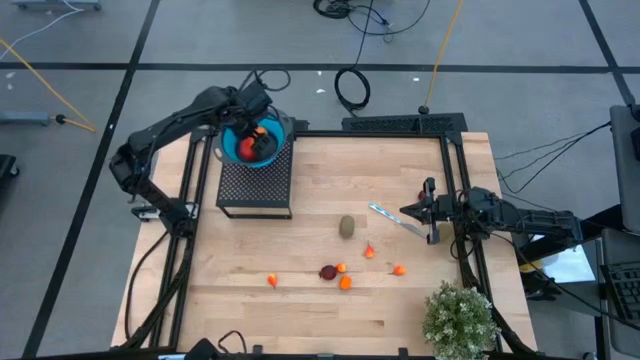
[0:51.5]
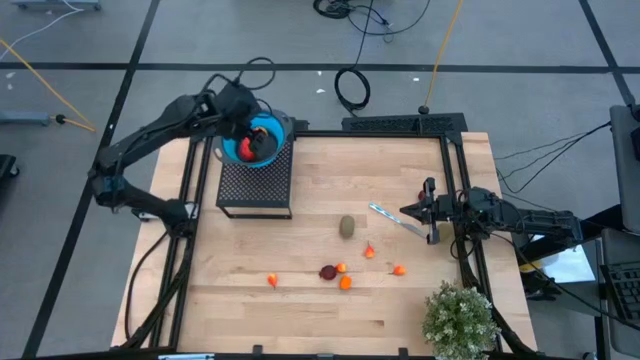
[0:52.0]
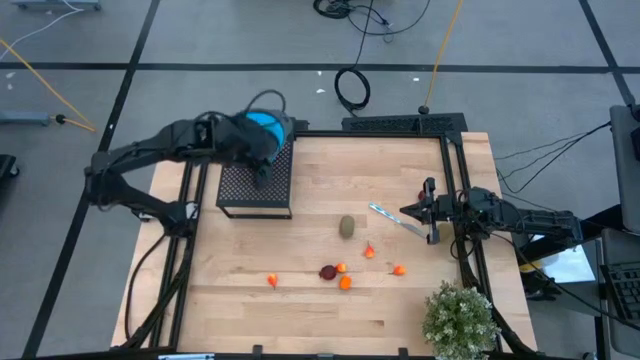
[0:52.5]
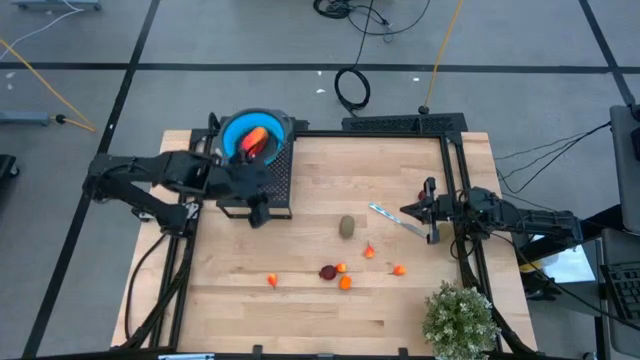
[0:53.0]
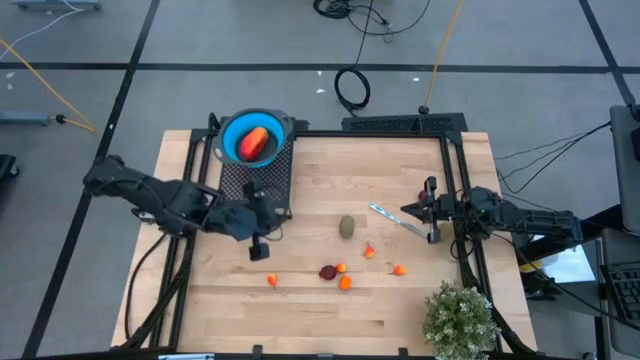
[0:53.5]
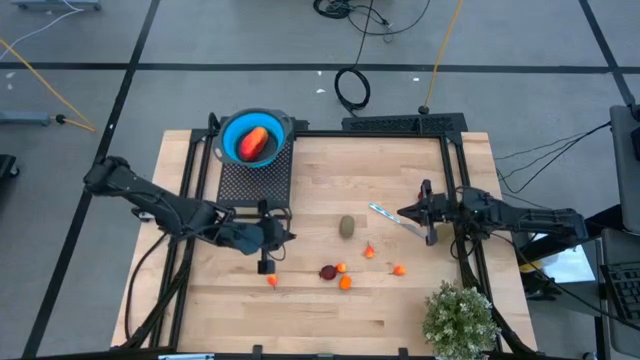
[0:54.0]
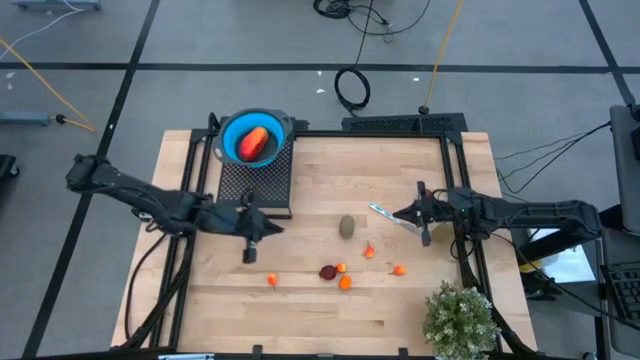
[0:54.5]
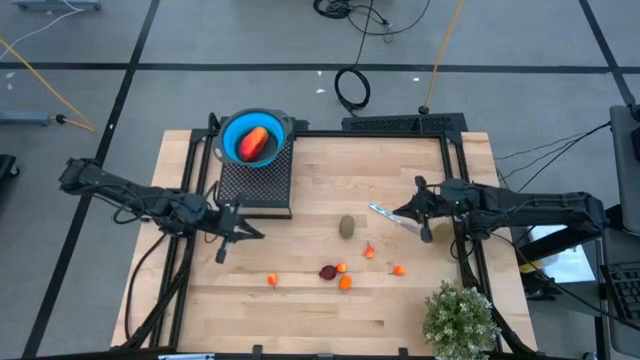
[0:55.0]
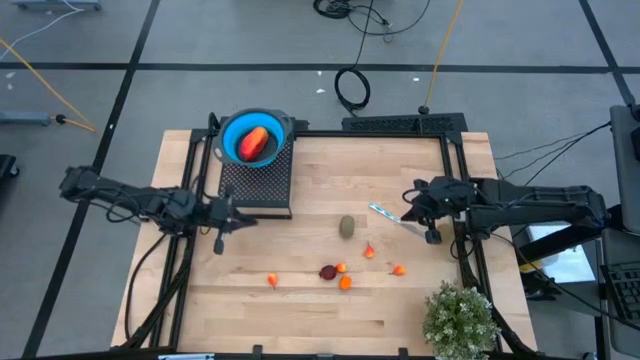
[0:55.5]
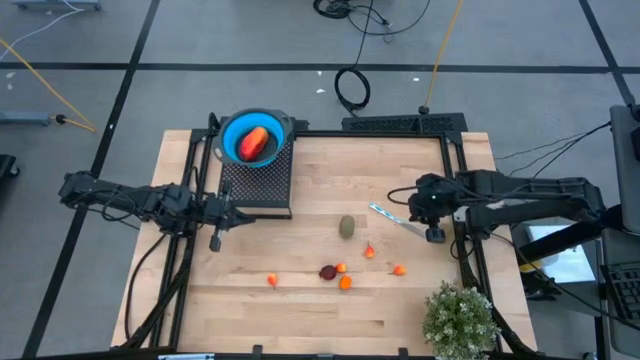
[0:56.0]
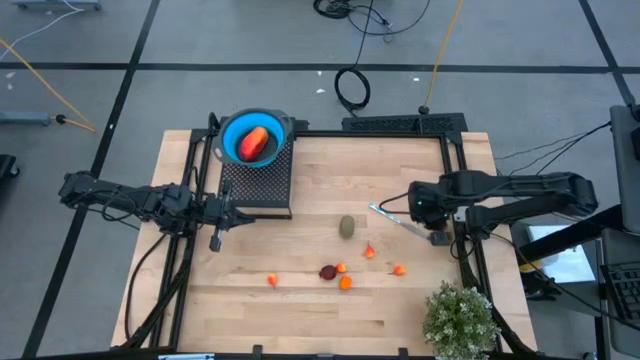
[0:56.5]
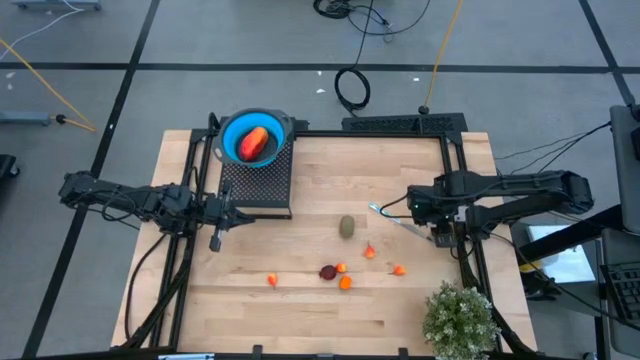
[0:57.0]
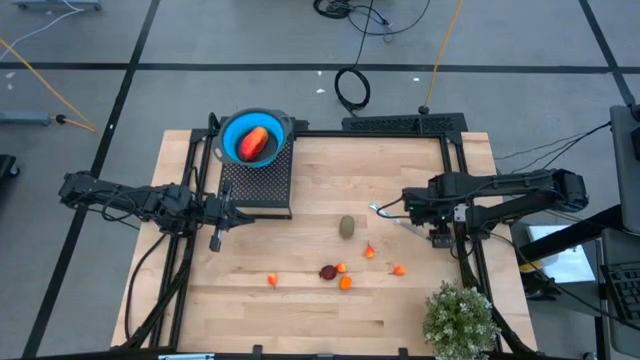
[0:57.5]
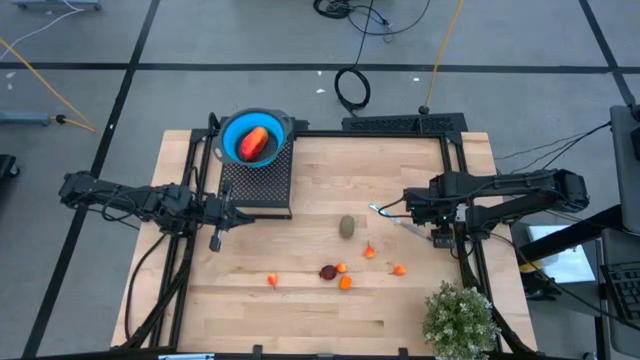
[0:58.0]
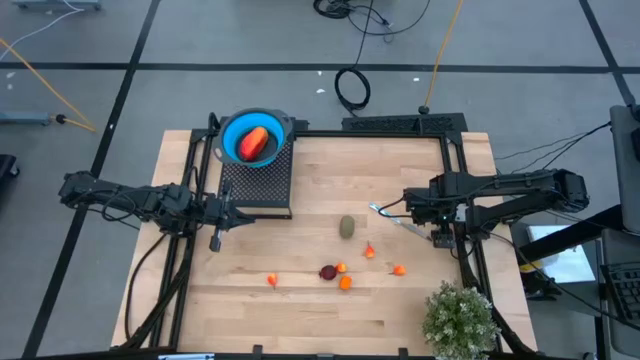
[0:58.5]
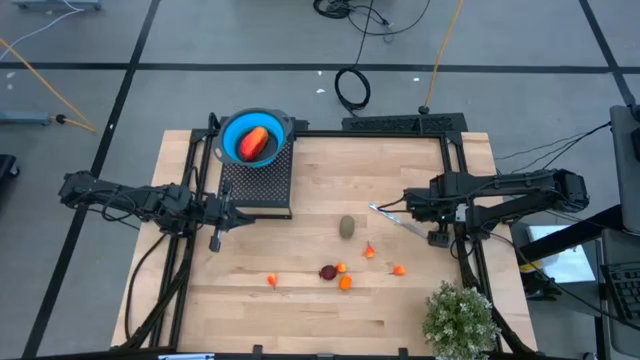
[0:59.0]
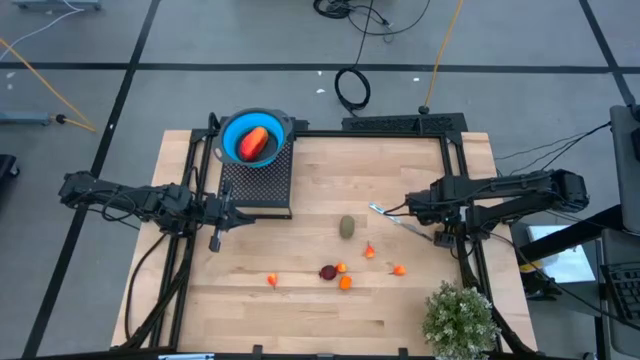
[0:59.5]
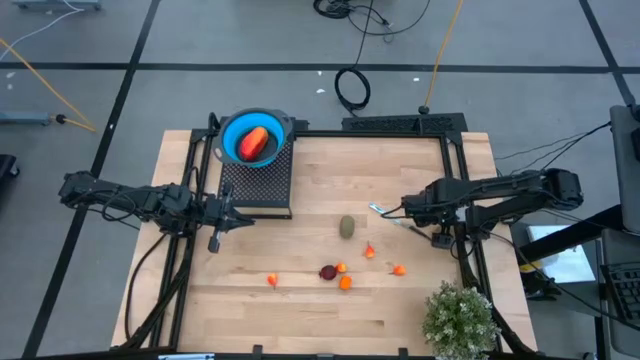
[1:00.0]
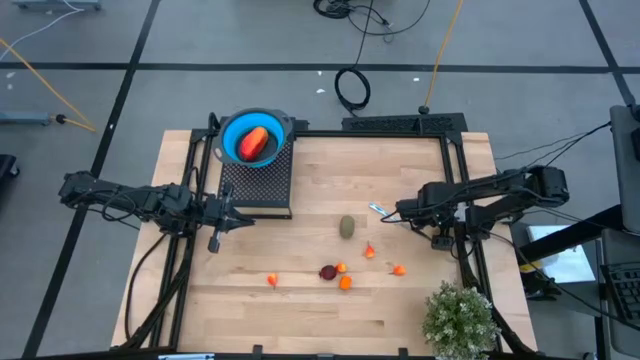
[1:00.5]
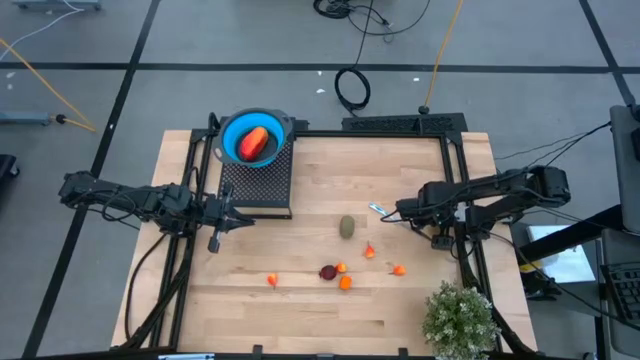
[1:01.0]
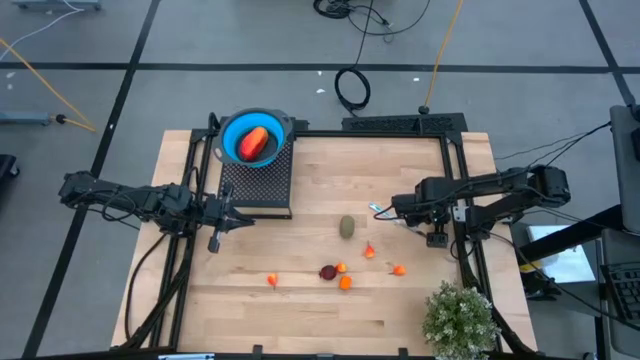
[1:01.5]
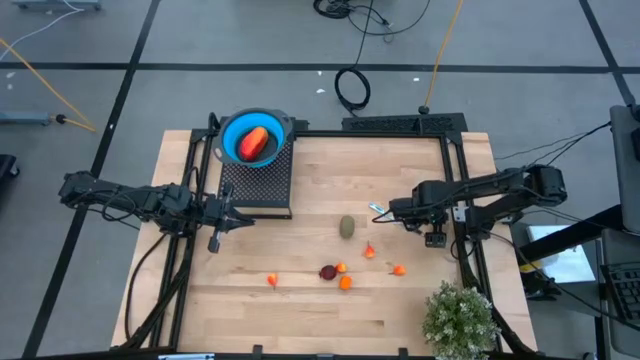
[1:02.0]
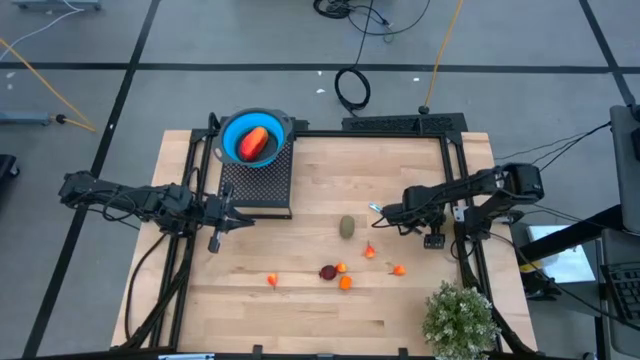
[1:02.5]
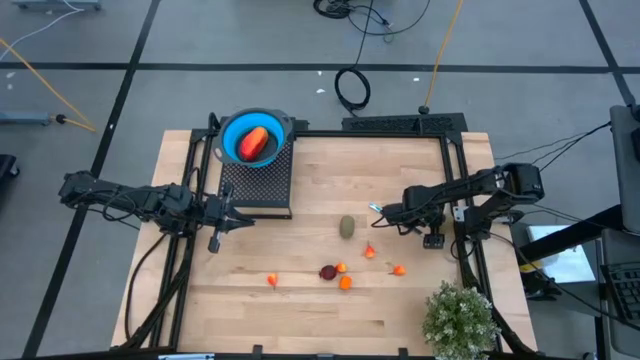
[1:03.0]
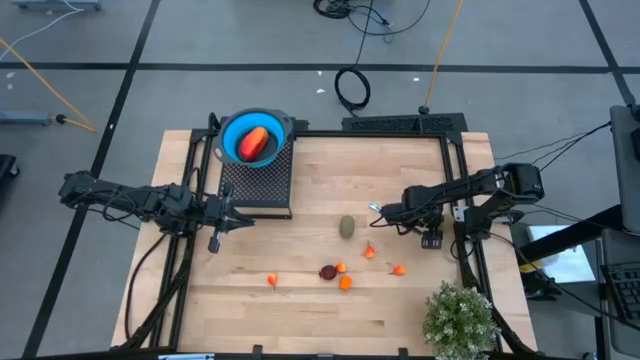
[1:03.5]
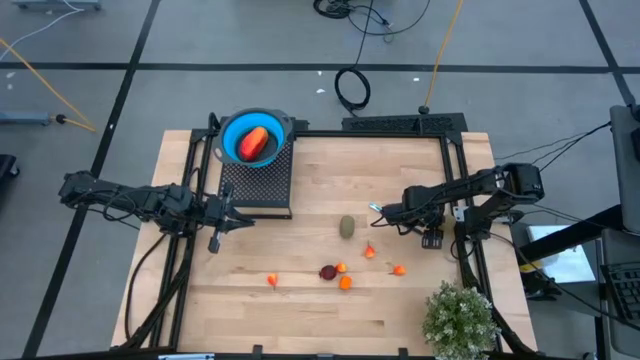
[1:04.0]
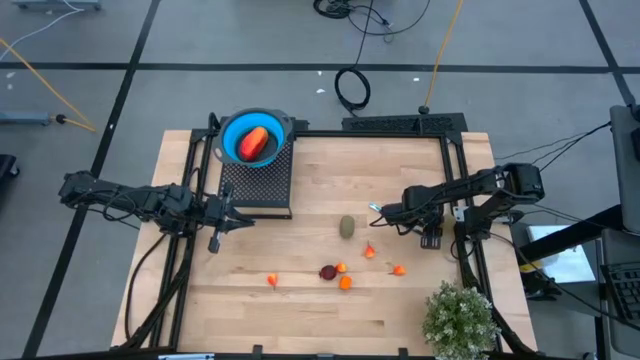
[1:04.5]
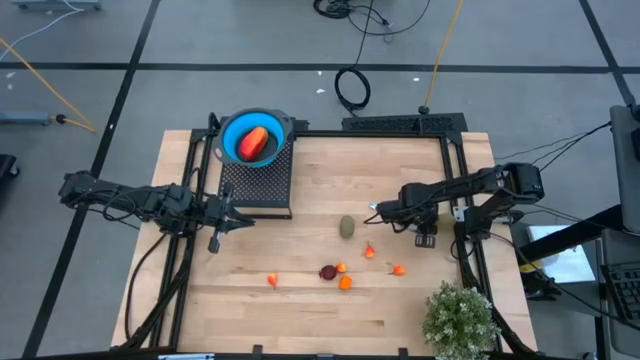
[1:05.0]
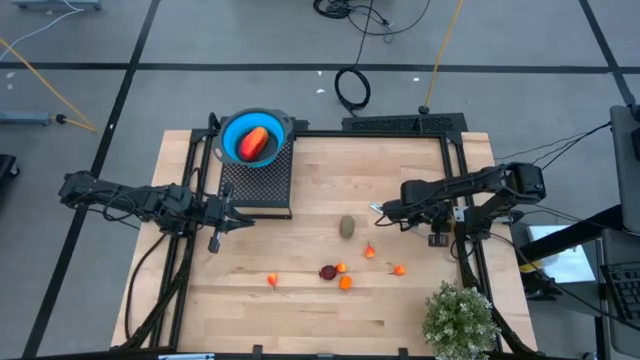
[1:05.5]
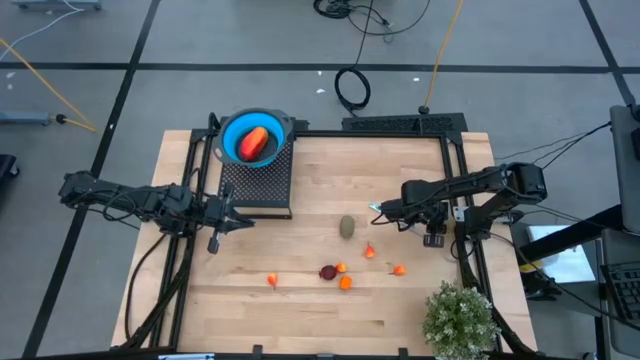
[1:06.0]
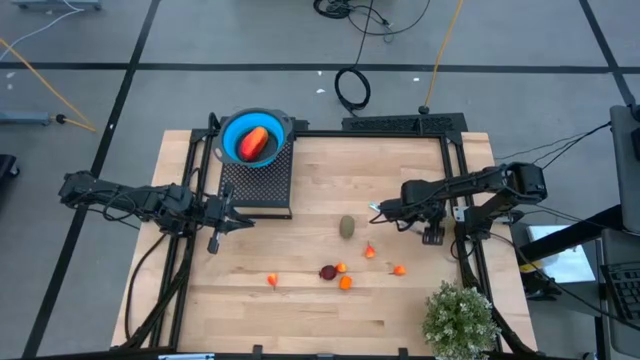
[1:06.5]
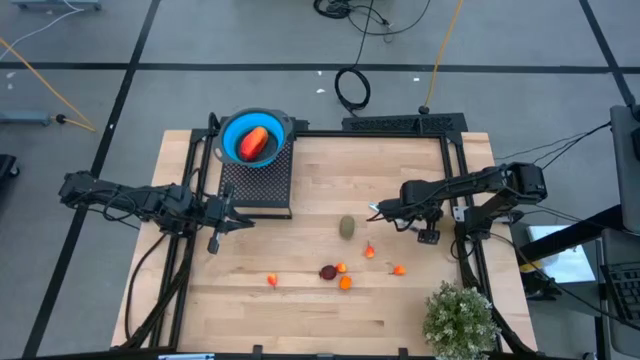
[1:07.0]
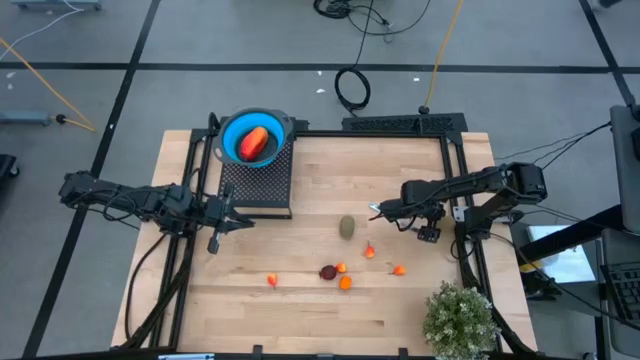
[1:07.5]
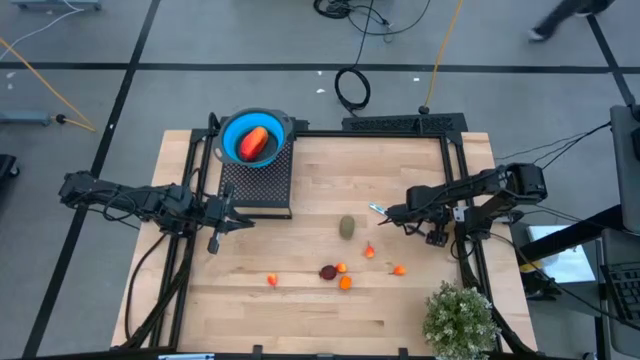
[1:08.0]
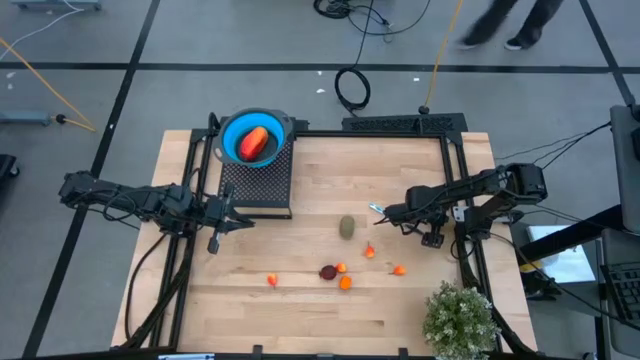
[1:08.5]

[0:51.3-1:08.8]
Task: Pick & Place Fruit
Put the brown kiwi into the blue strainer bowl on the shelf

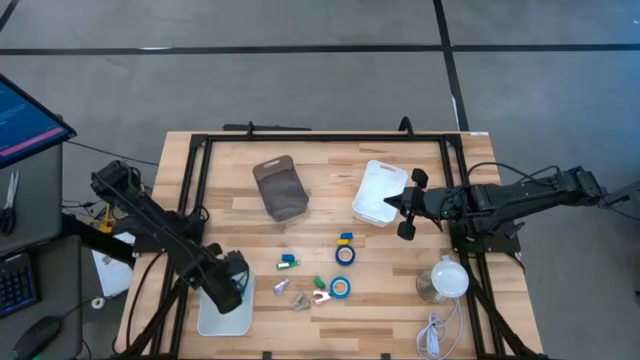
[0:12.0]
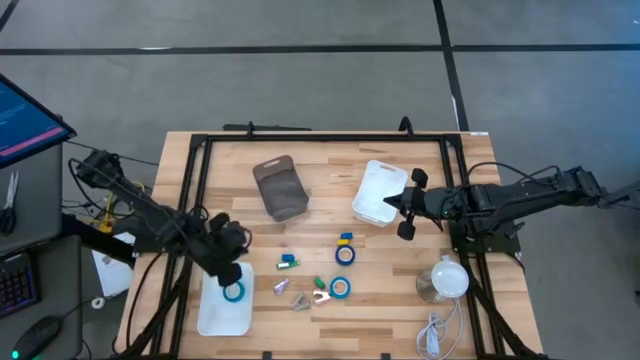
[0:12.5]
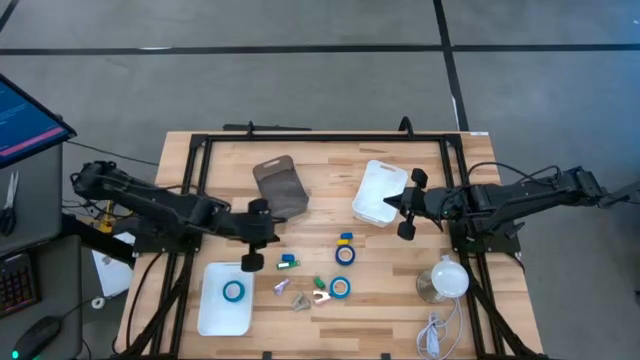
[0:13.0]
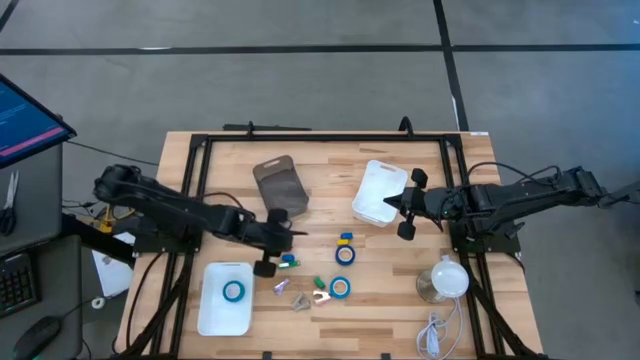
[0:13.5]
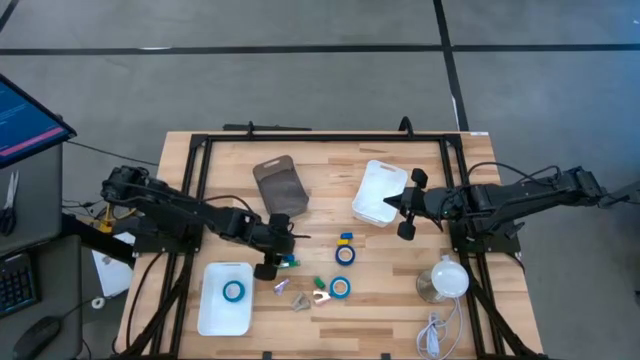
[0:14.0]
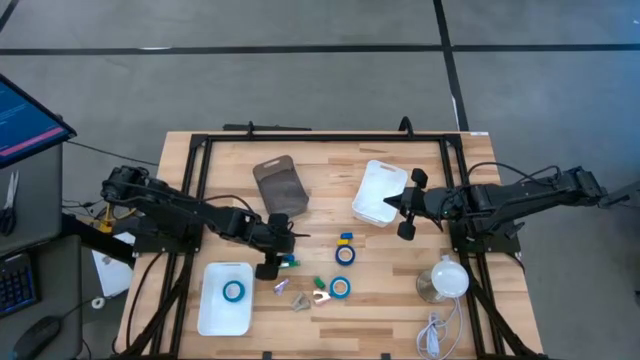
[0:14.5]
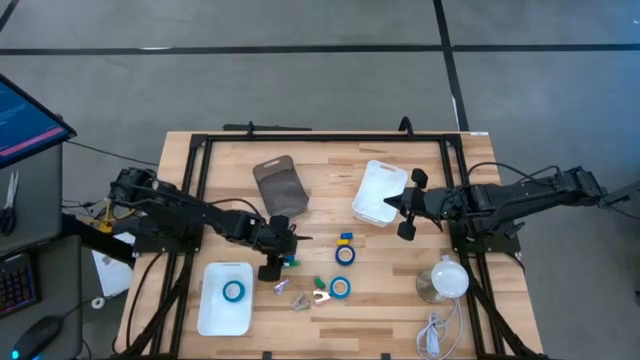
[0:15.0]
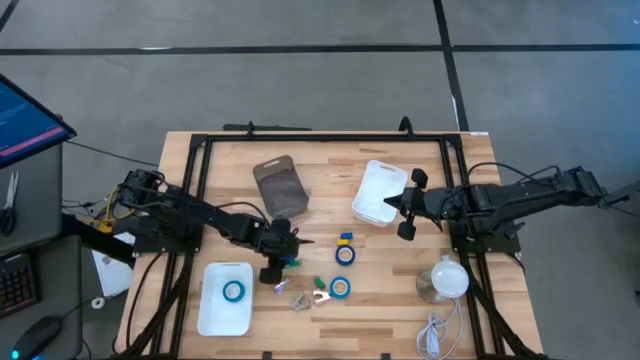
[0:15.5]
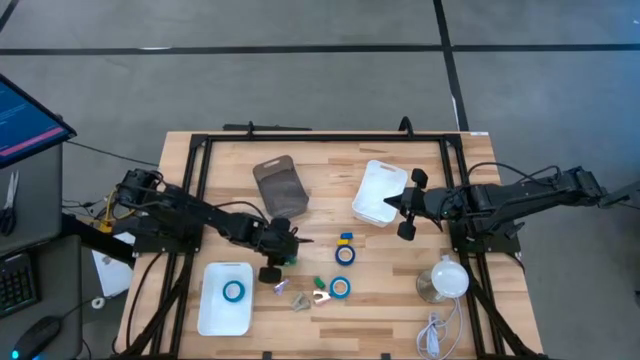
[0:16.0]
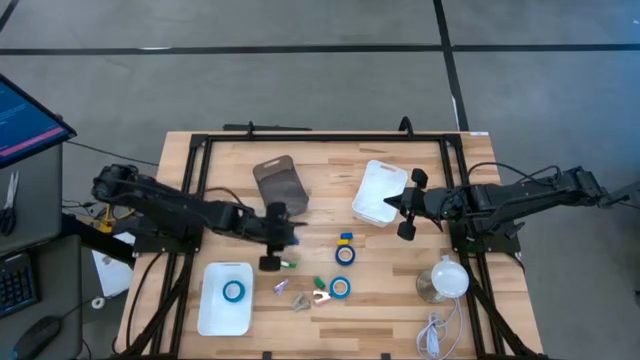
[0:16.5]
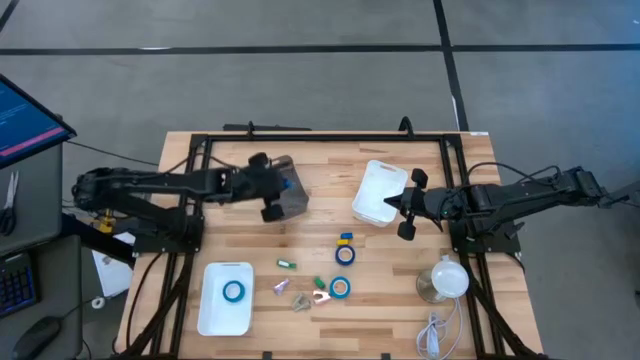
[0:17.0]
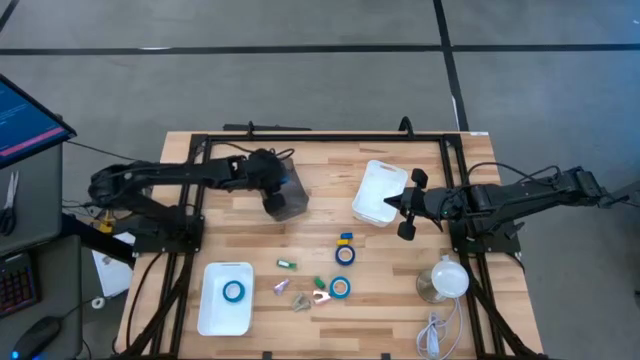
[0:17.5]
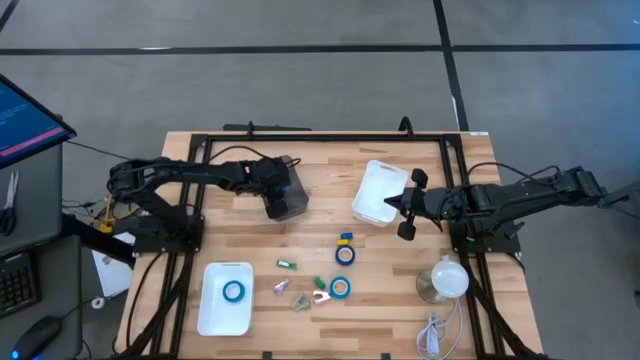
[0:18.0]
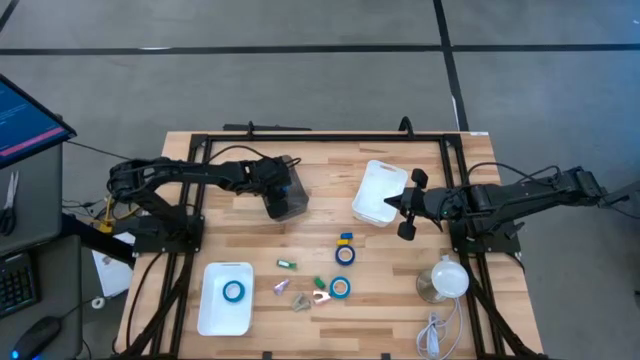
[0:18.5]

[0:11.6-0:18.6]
Task: Pick and place Stapler, Stapler remover, tape
Put the blue stapler into the black bin
